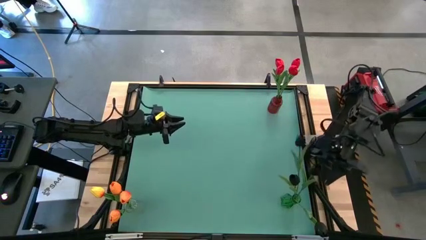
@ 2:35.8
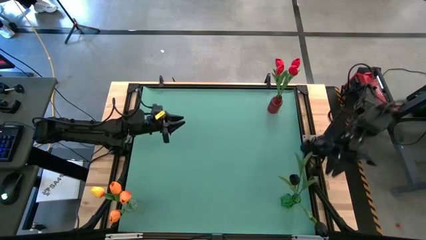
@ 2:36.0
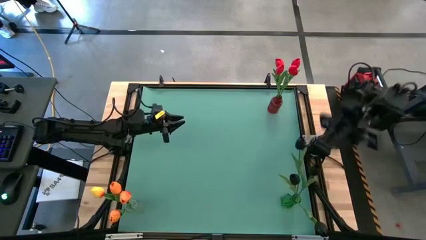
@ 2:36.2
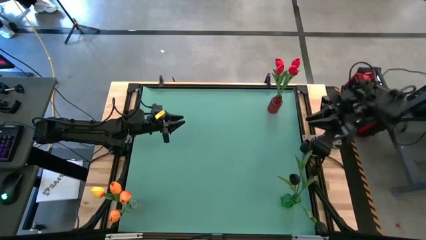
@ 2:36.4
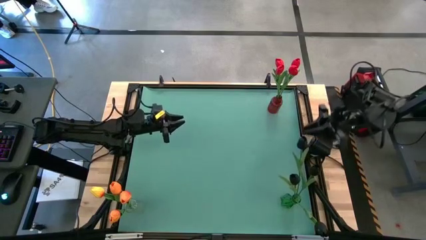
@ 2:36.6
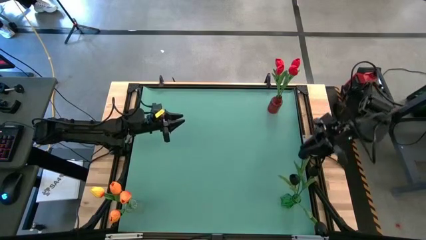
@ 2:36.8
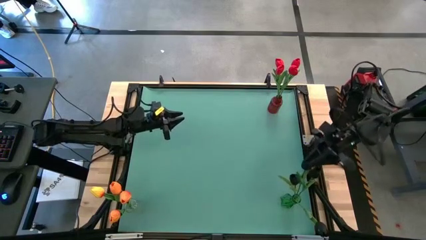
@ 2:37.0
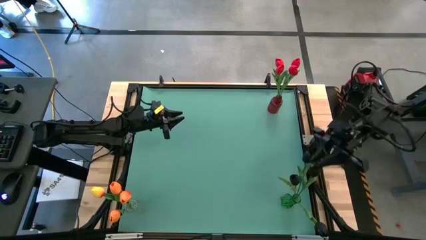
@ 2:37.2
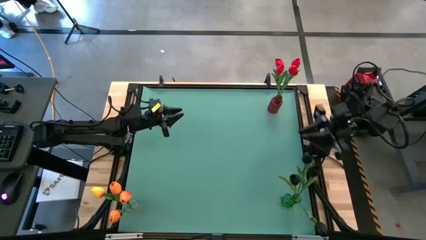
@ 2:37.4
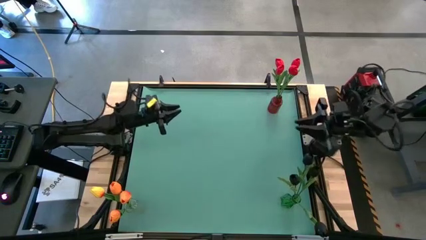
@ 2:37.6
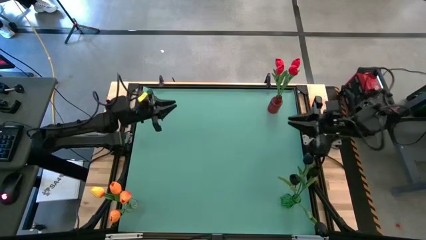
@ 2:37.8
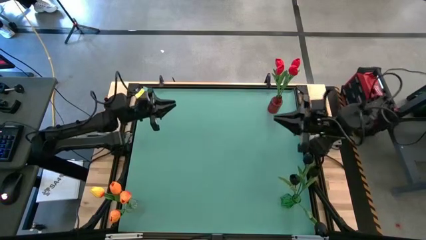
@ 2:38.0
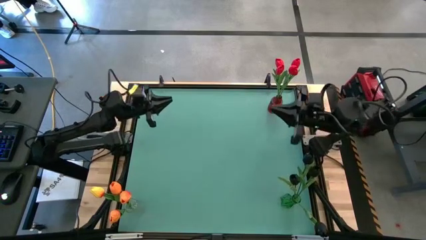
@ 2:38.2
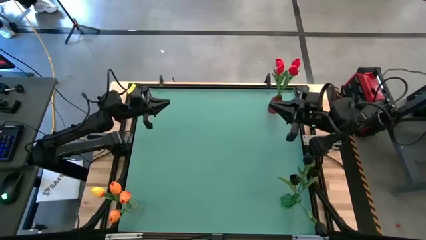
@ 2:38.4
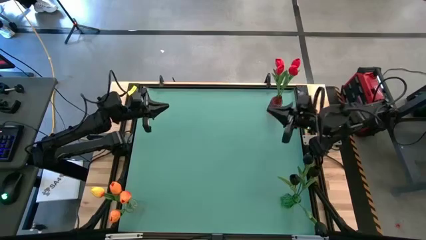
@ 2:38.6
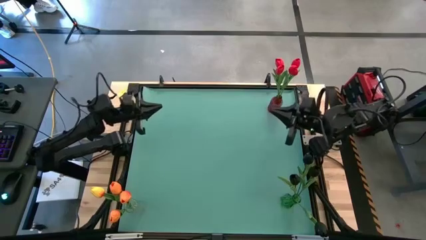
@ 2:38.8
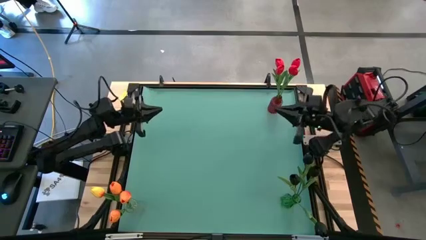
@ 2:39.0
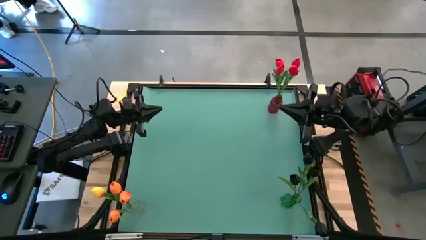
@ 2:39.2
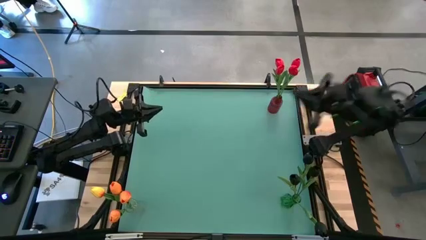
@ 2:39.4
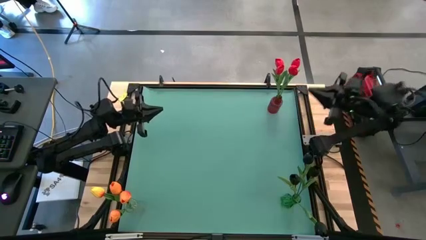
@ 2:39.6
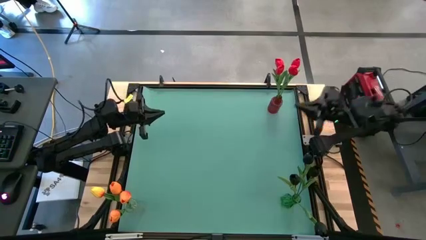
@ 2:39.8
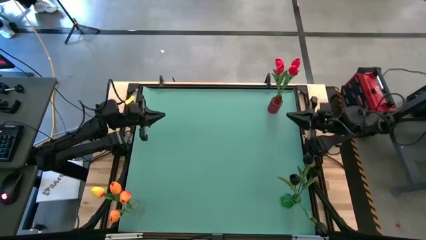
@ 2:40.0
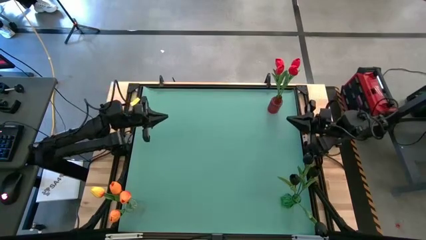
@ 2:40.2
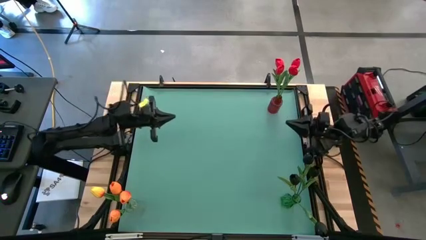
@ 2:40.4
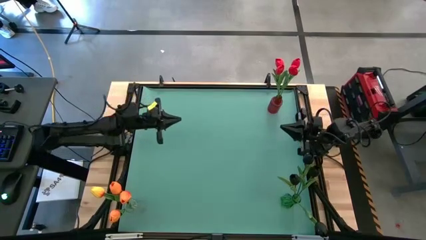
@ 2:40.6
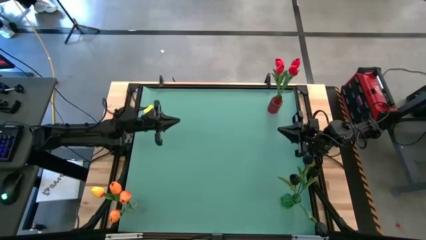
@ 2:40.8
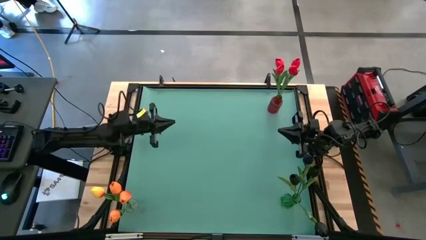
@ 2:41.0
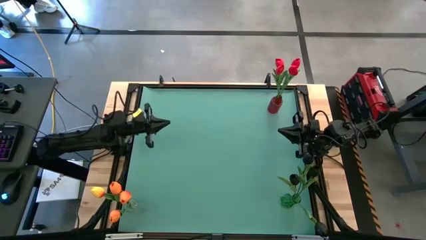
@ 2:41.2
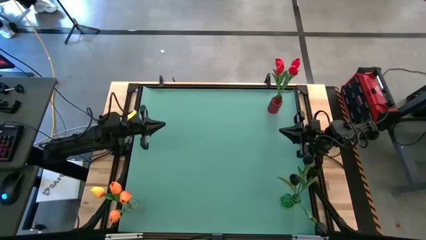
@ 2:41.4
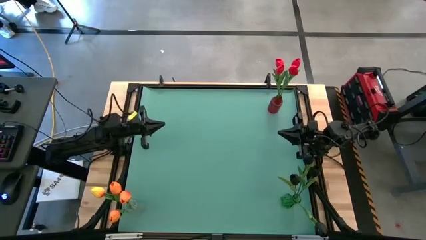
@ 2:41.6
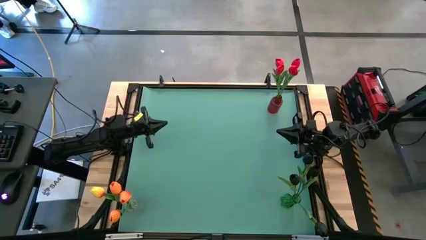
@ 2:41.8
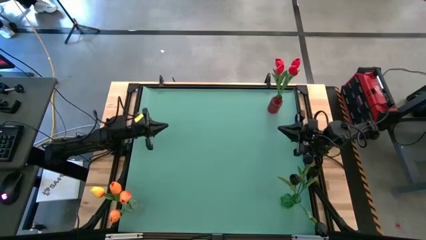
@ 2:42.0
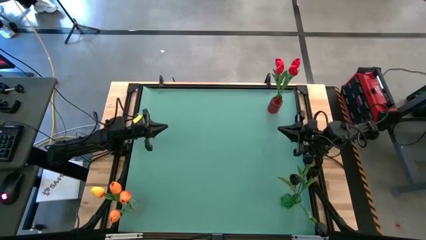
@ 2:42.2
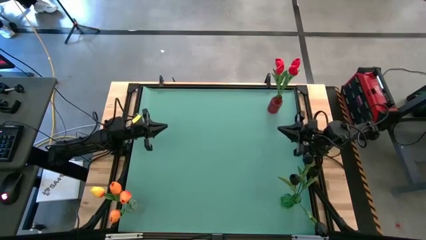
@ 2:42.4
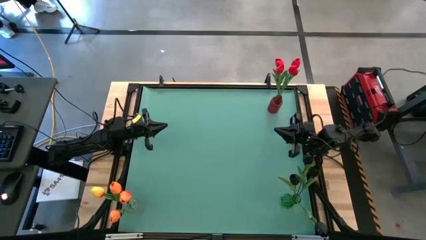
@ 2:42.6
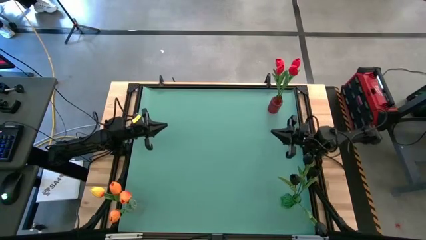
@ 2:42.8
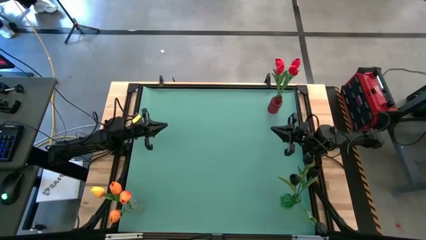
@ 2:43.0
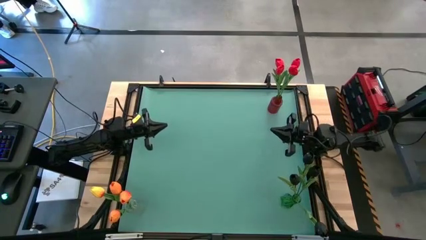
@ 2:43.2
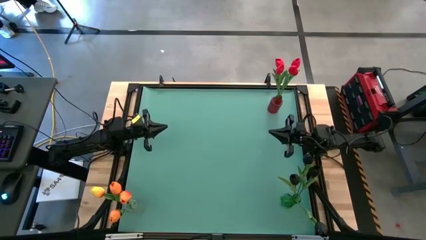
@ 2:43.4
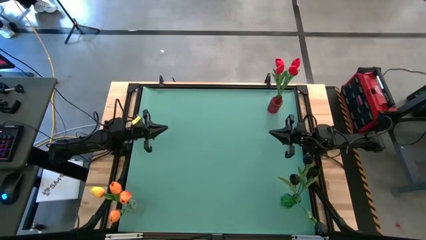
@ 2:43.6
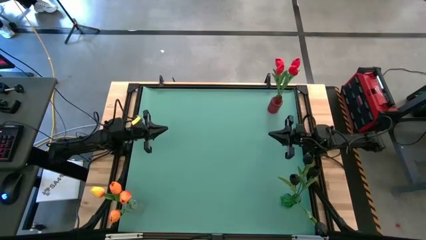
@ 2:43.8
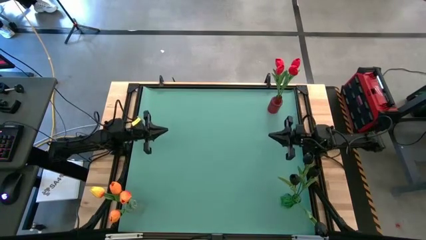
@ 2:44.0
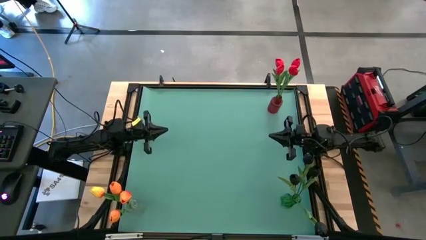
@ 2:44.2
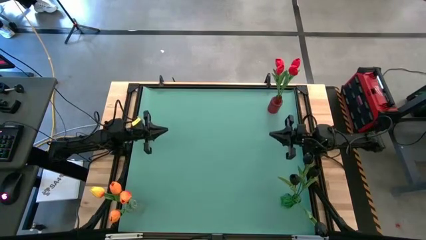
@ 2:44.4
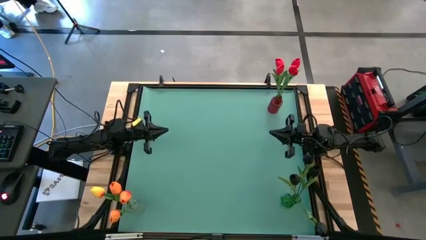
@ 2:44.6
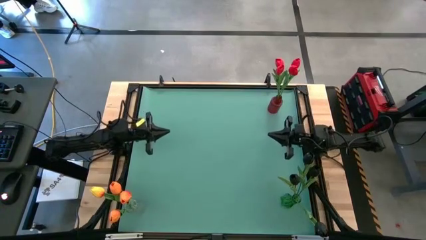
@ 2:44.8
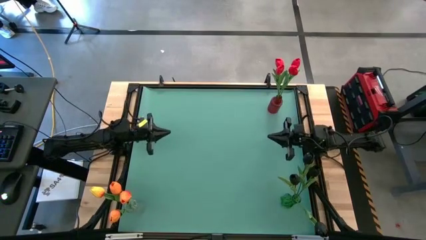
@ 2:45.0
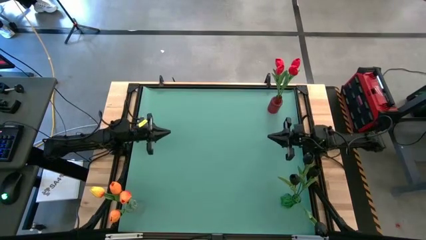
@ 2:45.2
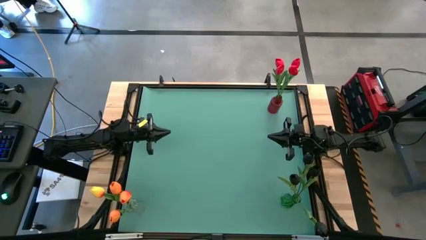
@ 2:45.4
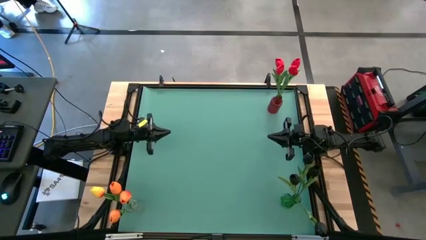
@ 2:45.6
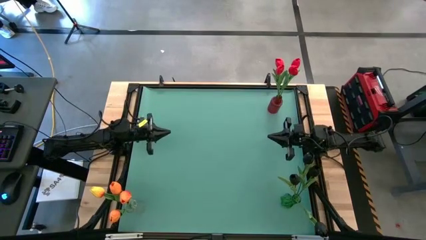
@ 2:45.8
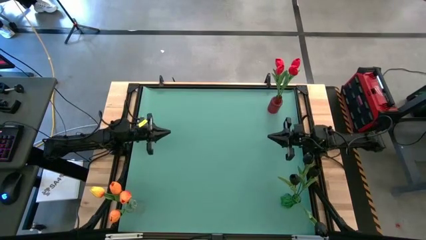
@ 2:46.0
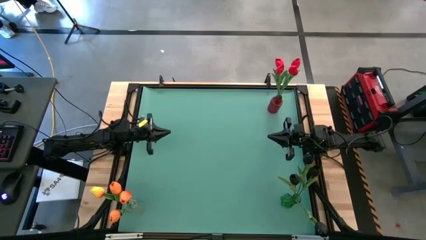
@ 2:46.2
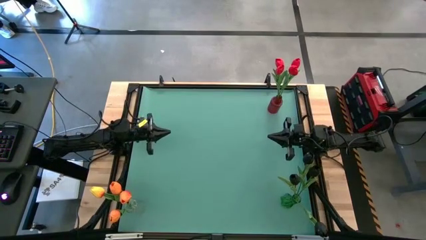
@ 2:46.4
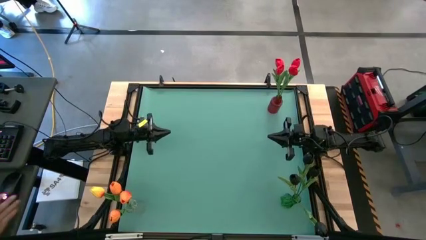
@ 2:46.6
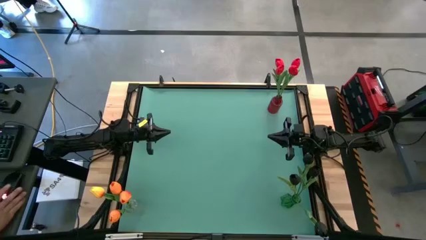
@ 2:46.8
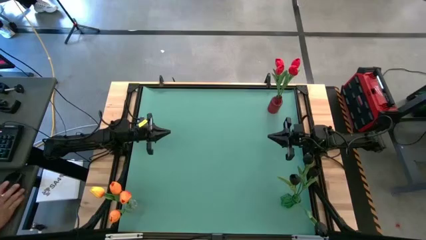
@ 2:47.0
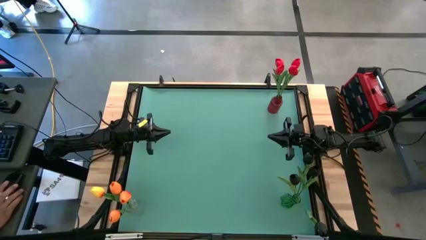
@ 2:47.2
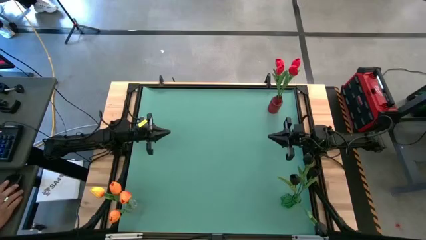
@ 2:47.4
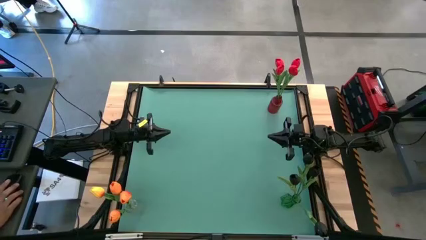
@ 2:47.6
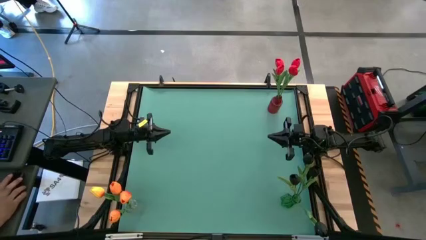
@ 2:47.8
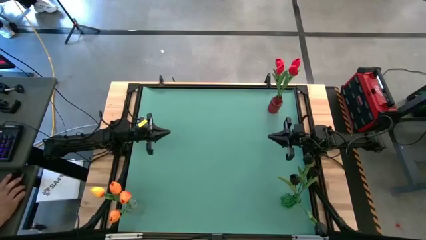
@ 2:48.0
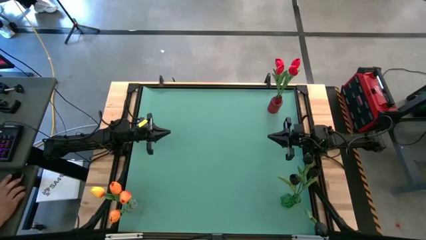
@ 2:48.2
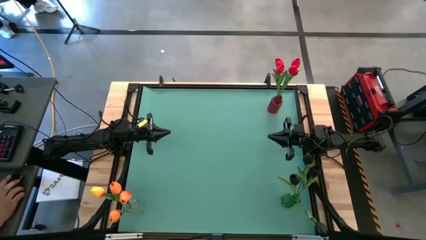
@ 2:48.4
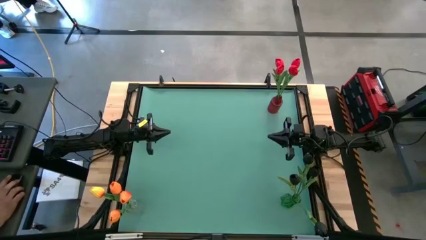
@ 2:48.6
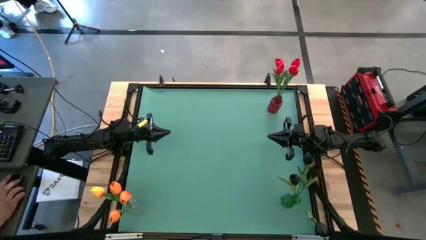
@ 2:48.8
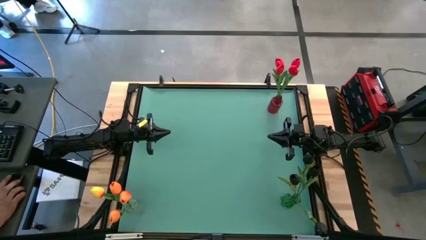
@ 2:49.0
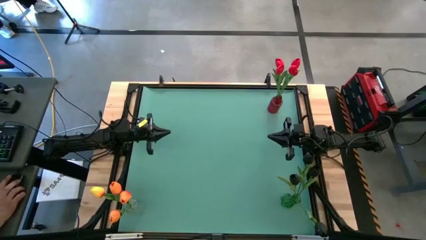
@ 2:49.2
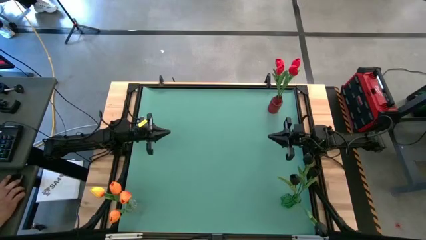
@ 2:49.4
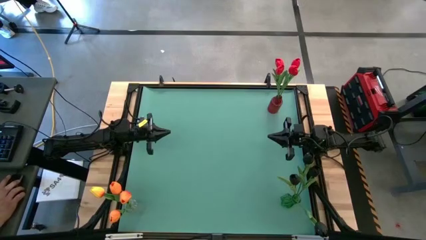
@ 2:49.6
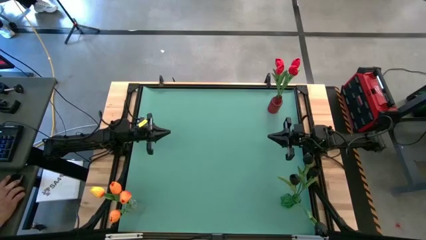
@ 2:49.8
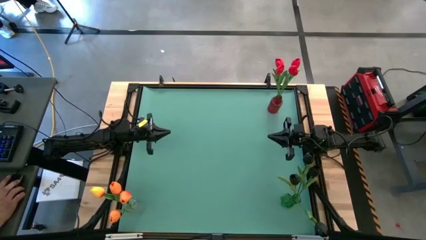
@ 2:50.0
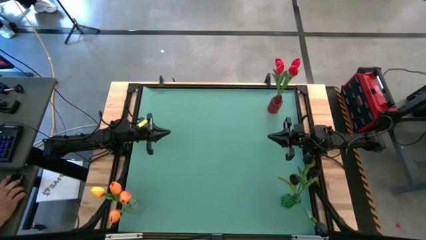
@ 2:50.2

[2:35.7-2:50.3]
Task: Sort flowers into vase by color
Return to Home Position

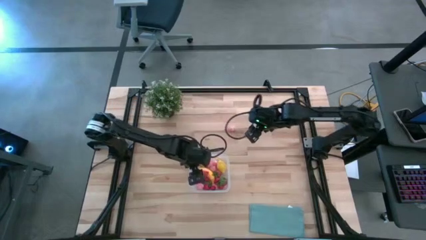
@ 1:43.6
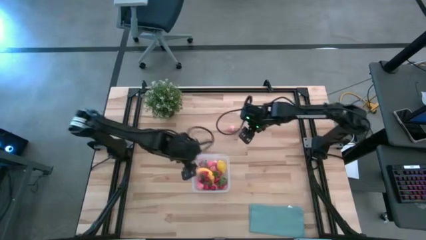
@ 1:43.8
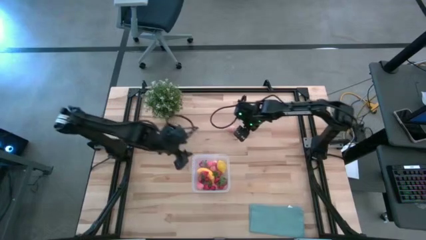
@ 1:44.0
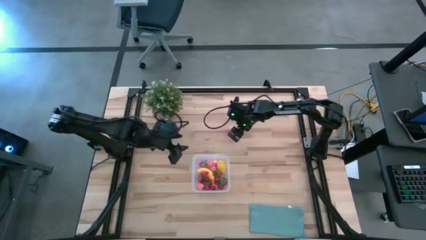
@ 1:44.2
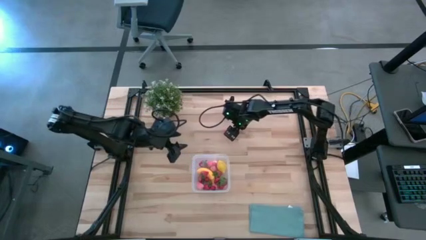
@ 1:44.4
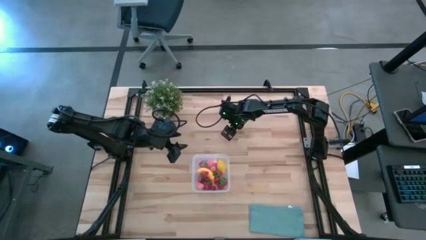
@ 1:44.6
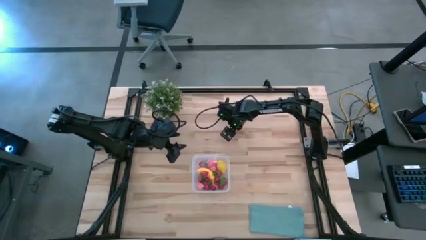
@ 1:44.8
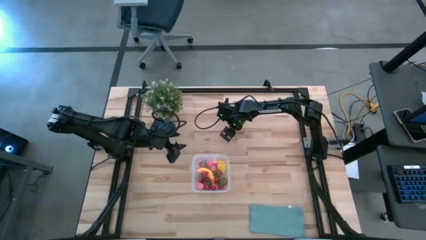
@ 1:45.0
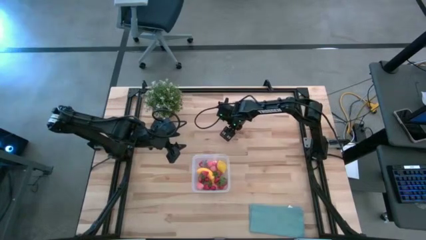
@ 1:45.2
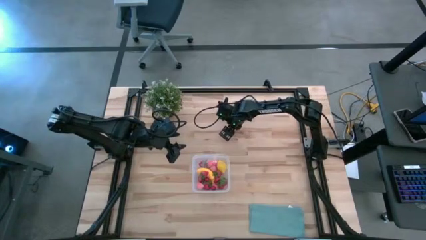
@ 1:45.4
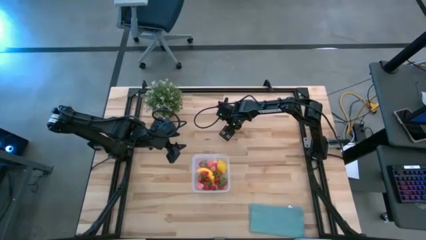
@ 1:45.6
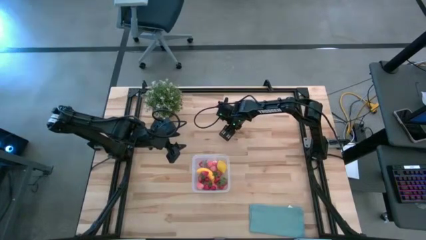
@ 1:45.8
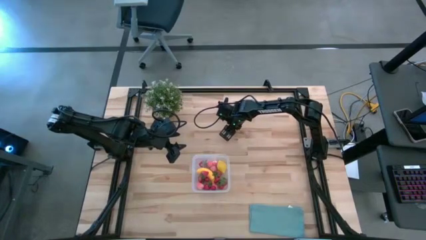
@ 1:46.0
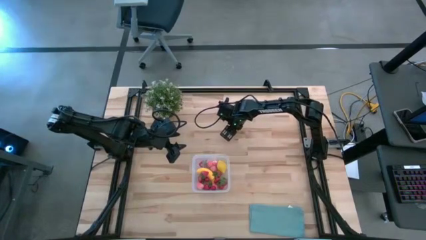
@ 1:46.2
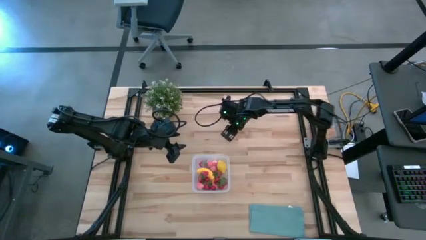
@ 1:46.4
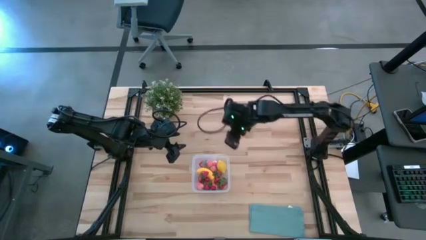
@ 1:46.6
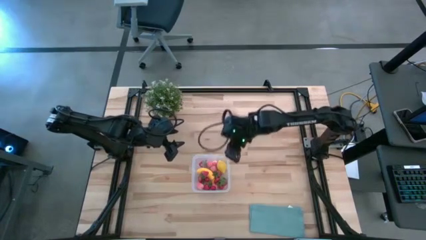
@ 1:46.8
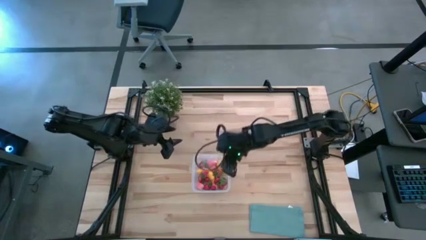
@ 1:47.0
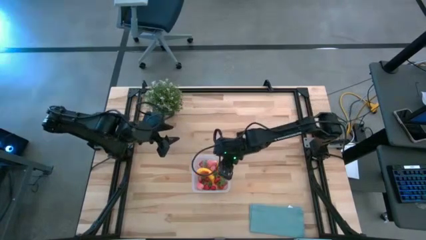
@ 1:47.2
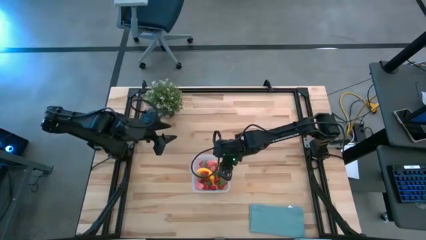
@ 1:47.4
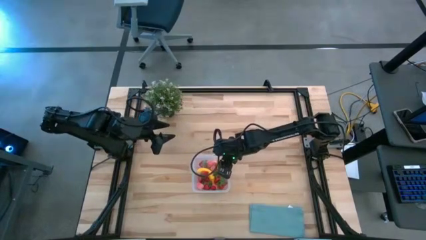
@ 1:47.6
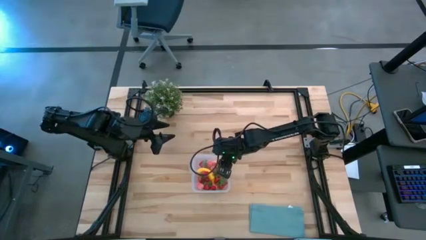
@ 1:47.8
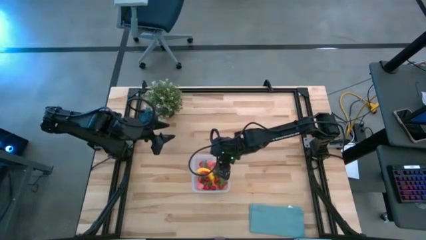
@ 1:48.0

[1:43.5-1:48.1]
Task: Pick and placing Produce into tupperware
Put the pink peach into the transparent container
